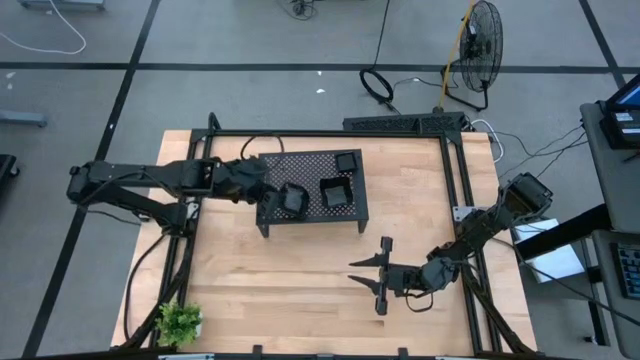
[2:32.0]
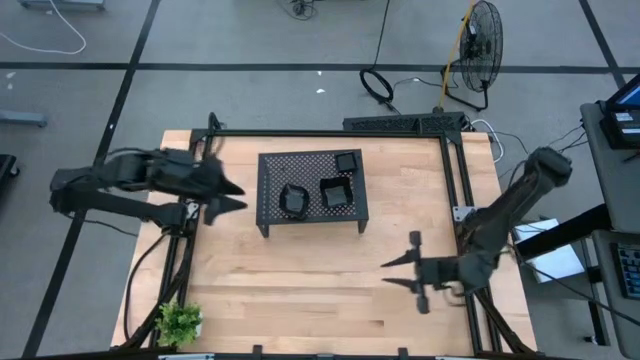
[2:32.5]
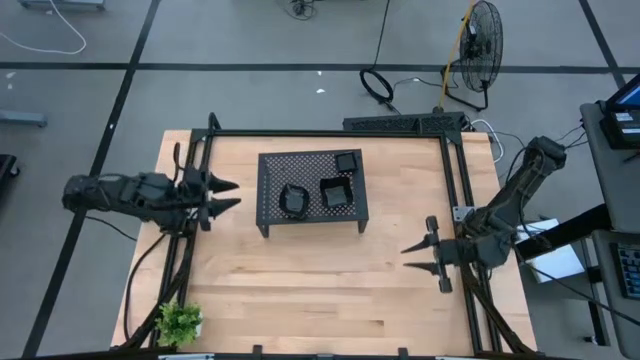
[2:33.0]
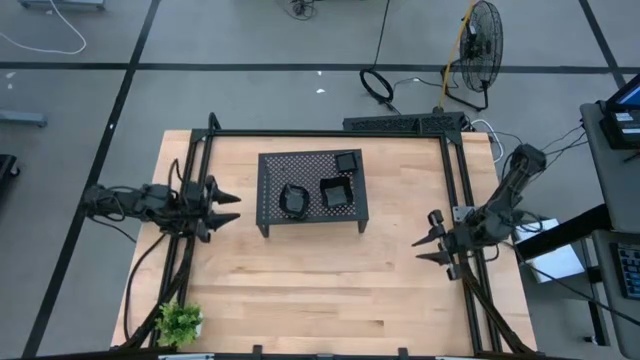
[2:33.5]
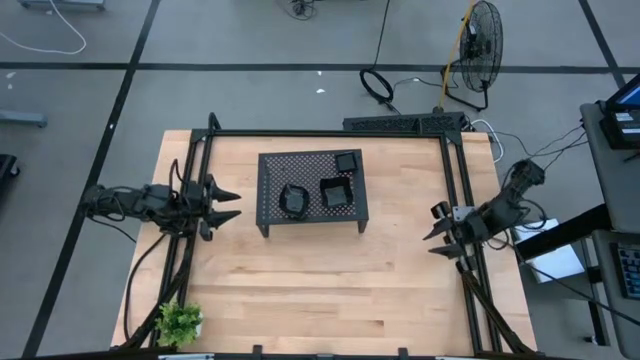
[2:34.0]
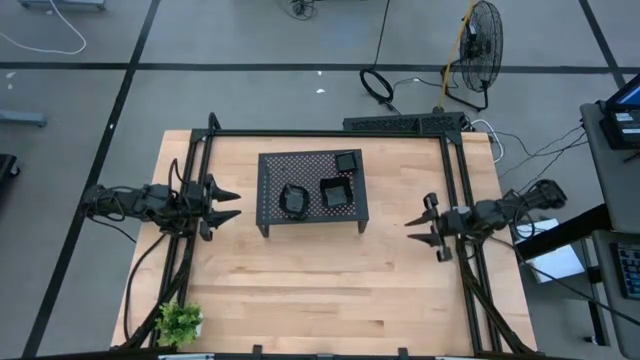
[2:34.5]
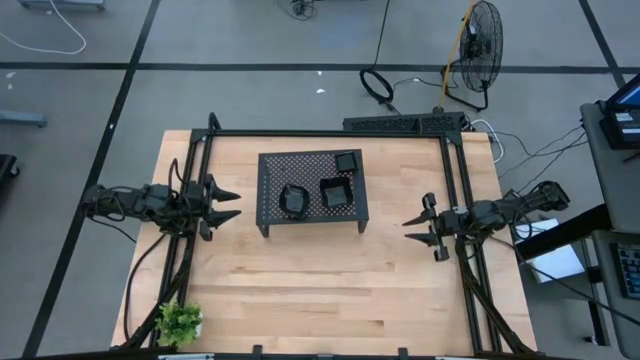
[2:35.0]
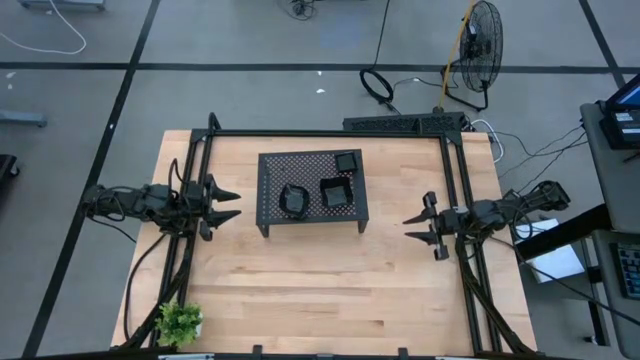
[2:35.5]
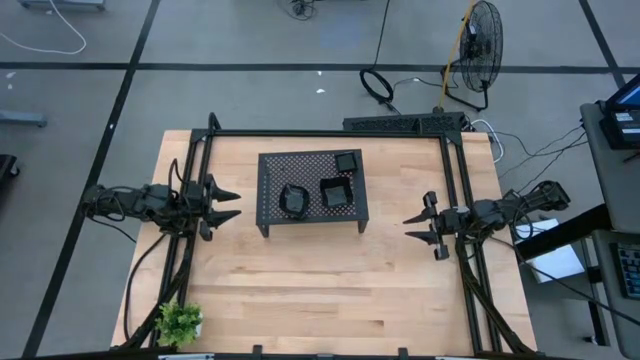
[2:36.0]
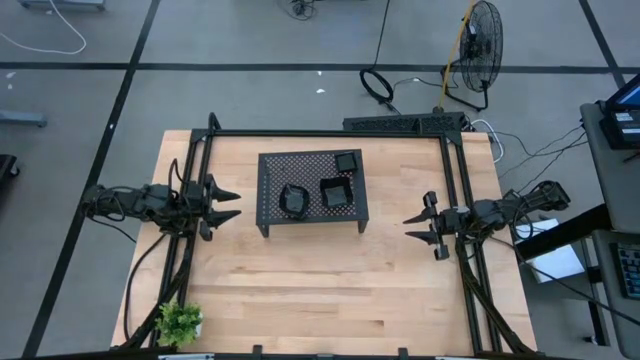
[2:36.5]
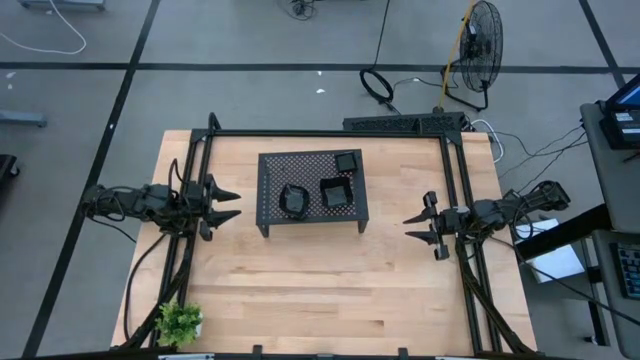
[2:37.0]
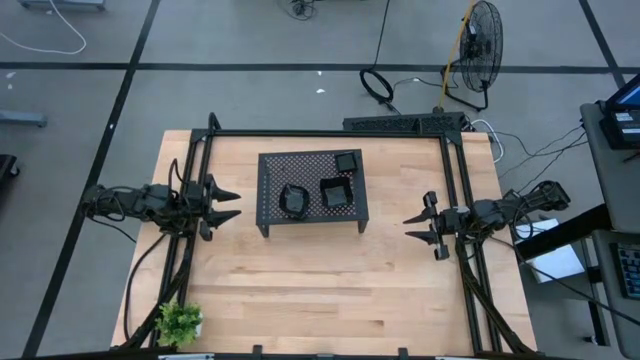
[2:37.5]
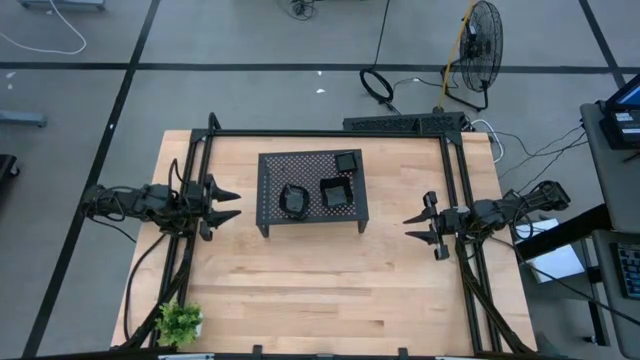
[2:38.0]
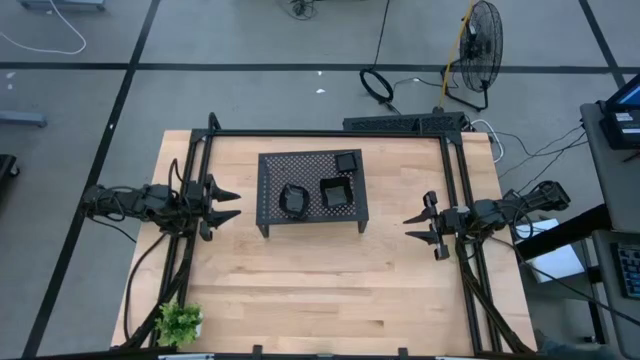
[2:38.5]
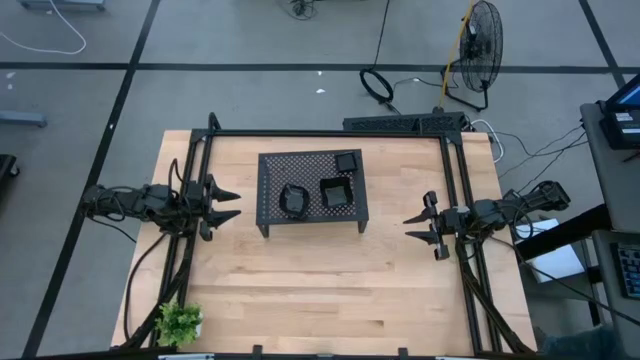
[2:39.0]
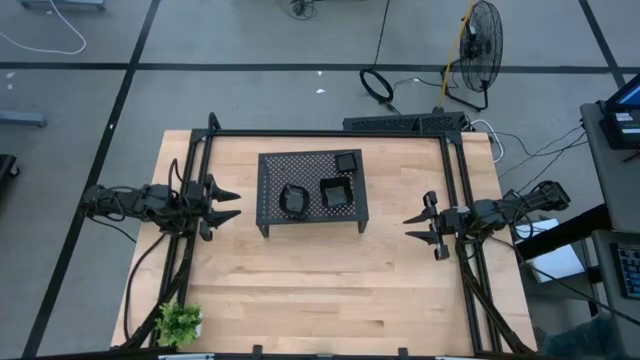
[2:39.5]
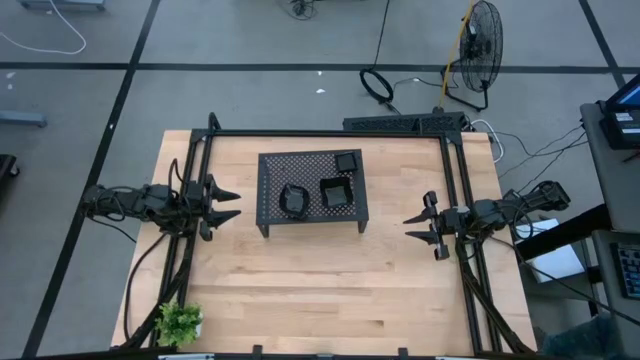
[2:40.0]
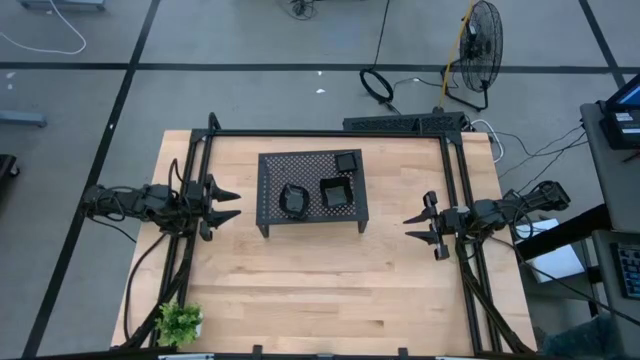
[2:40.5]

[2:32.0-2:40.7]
Task: Pick & Place Mini shaped plates
Return to Home Position

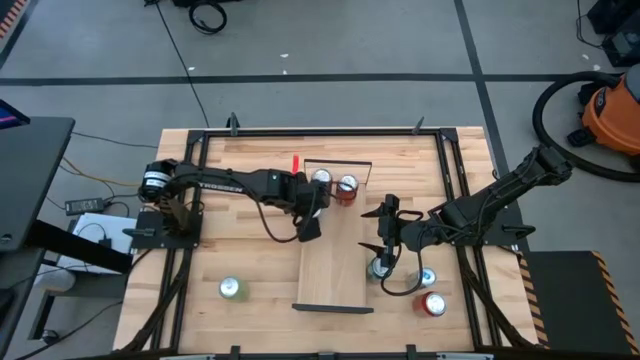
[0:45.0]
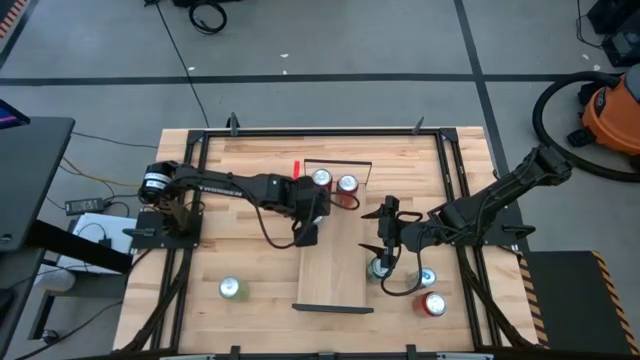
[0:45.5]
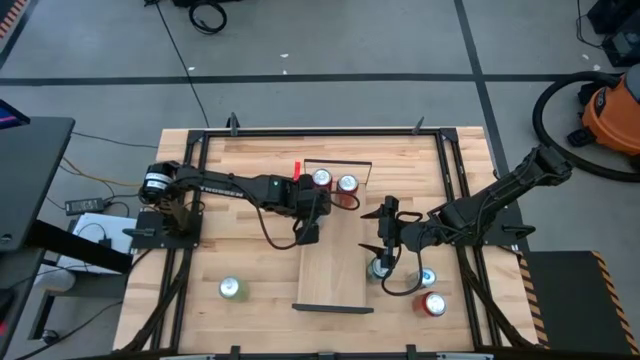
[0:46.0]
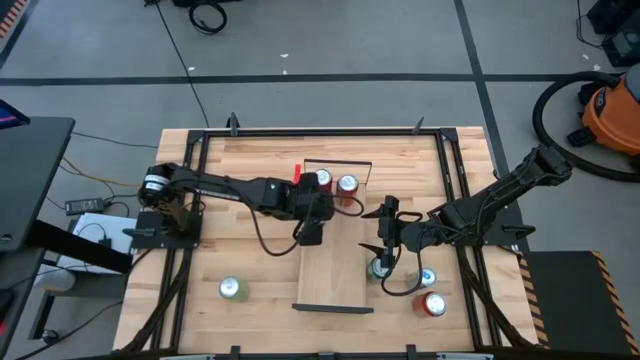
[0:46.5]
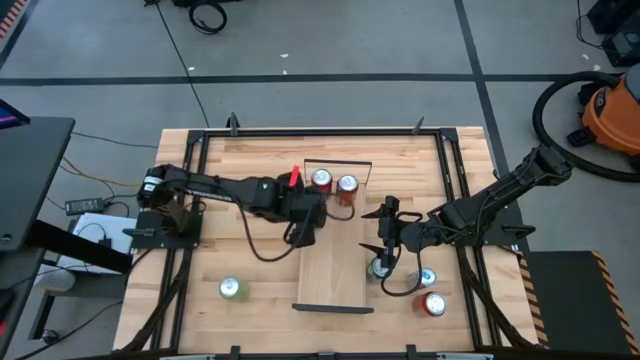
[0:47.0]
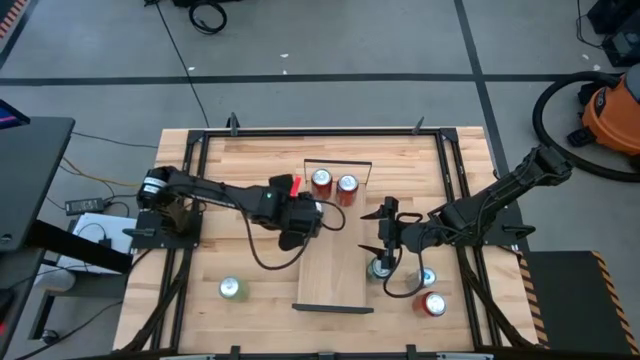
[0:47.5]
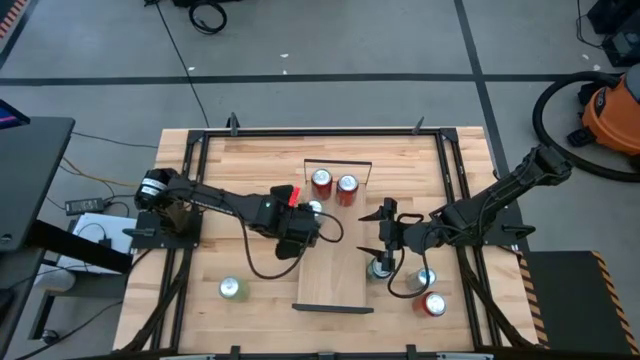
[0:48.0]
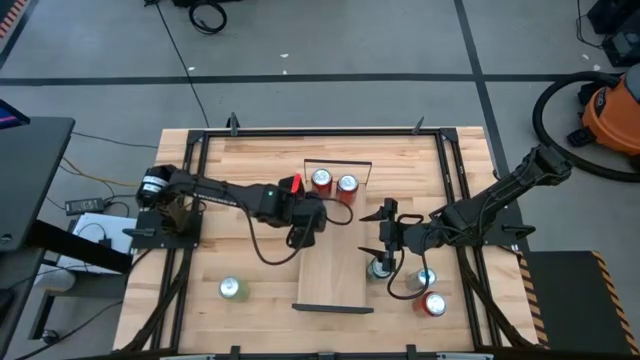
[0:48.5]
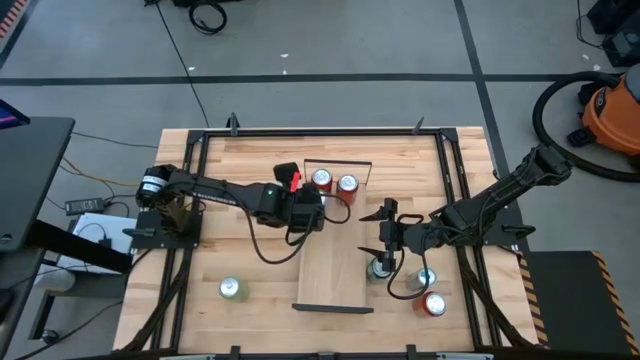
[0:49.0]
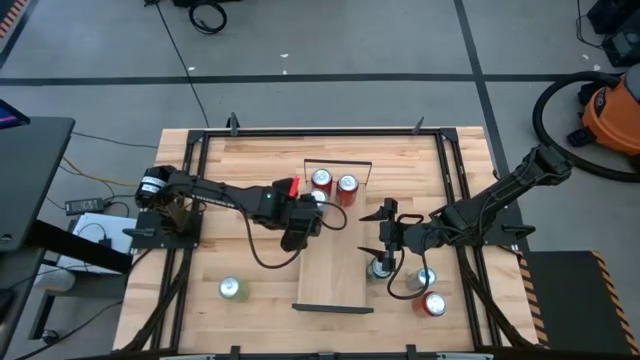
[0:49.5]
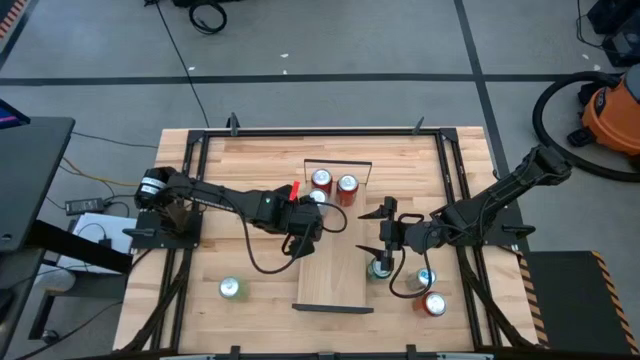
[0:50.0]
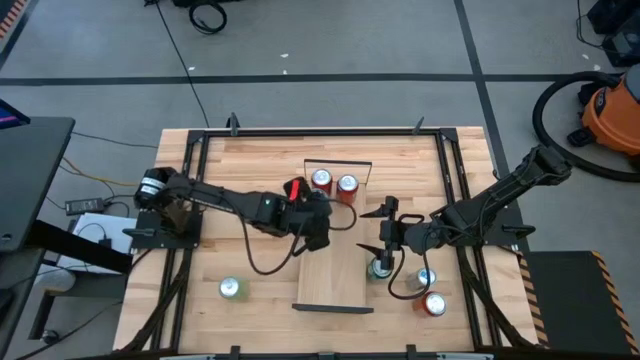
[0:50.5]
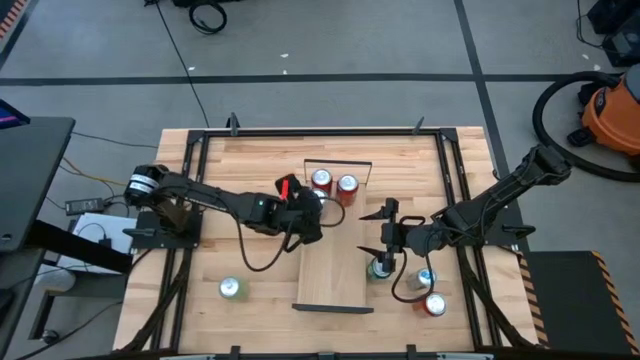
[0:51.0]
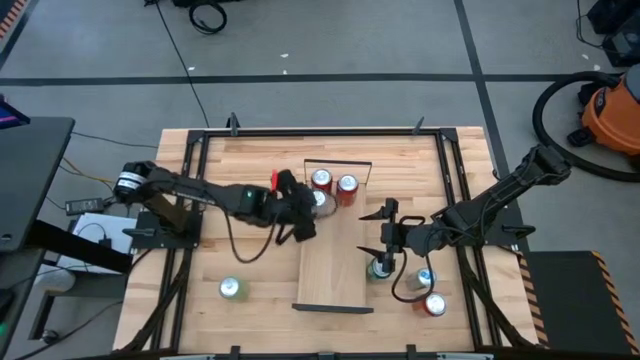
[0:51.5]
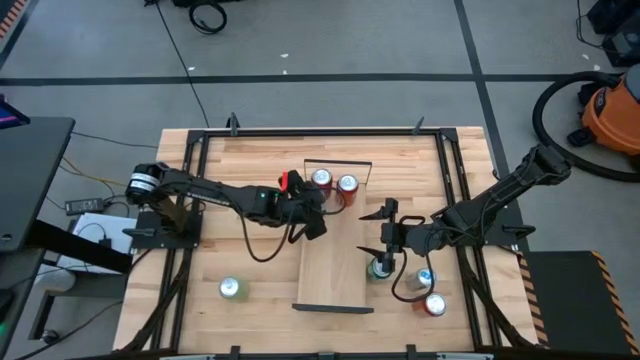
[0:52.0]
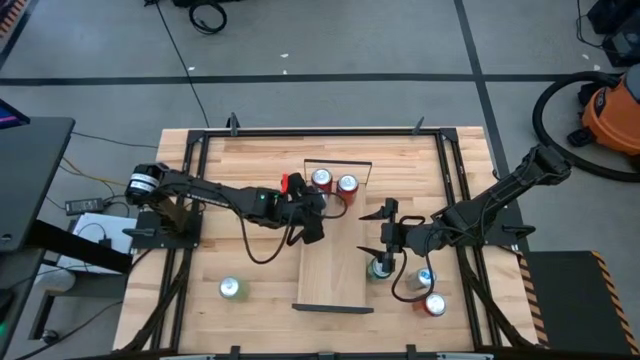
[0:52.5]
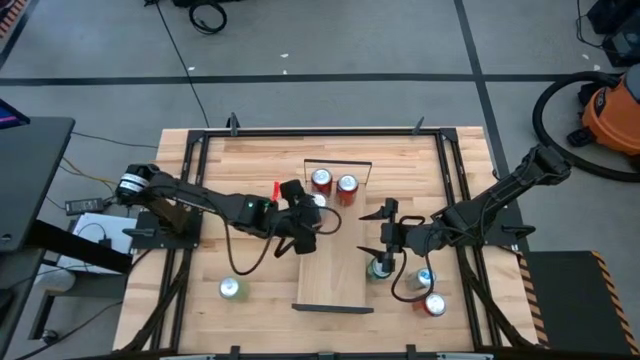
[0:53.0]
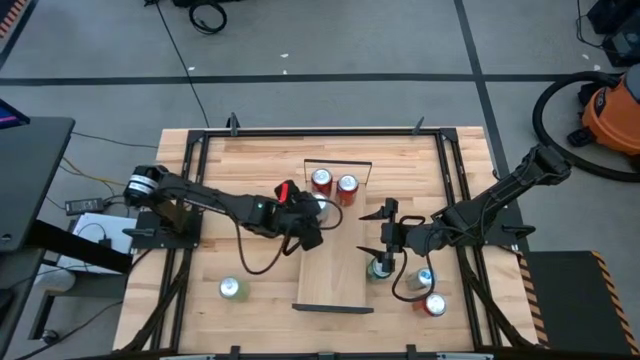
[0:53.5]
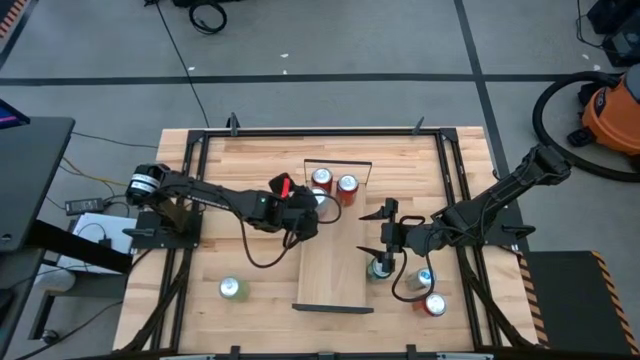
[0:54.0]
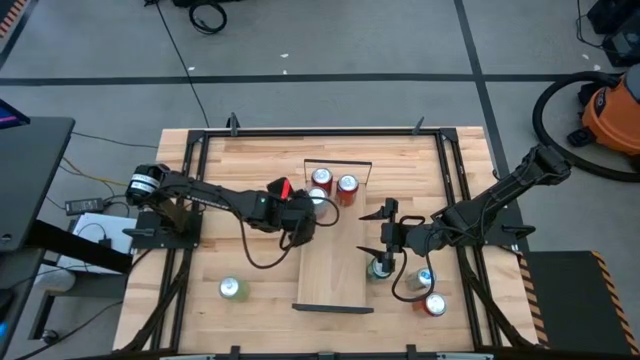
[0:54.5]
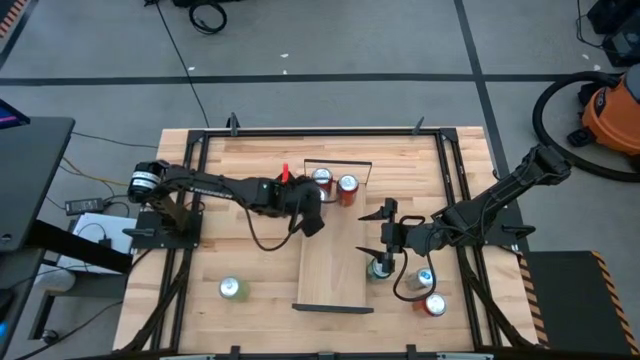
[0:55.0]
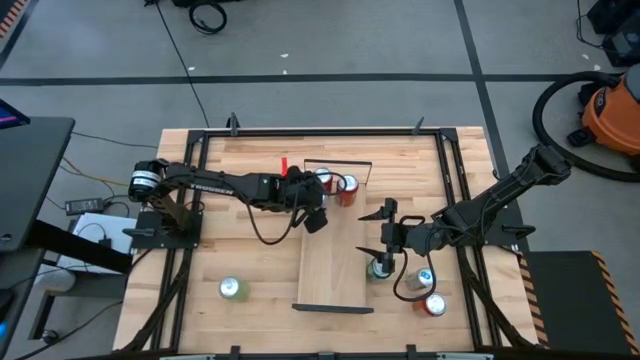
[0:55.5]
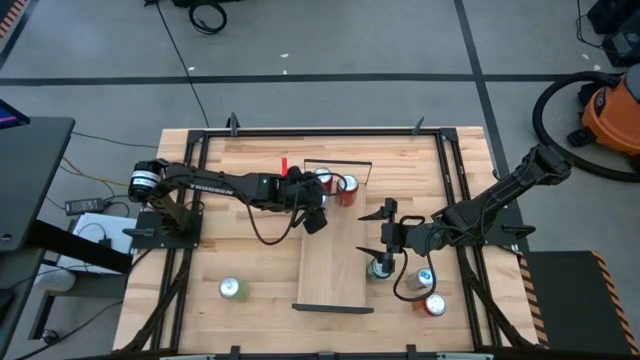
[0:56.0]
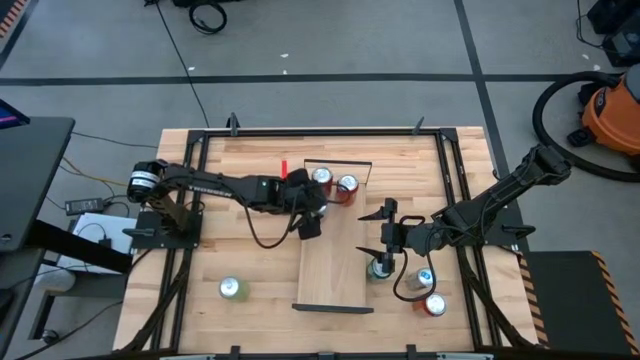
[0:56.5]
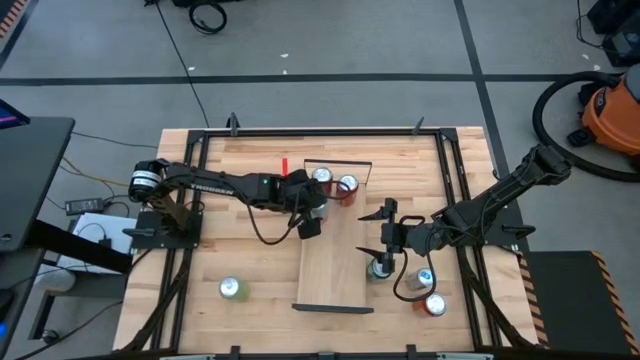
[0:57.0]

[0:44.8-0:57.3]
Task: Place canned beverage on shelf
Put the yellow/white soda can on the shelf
